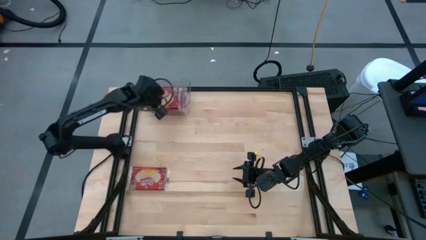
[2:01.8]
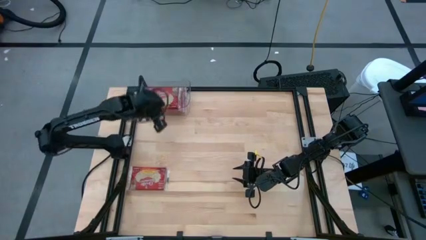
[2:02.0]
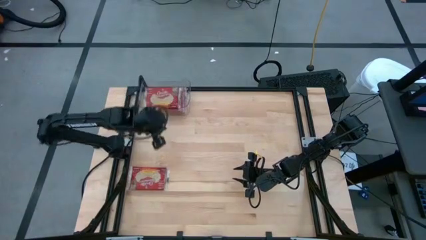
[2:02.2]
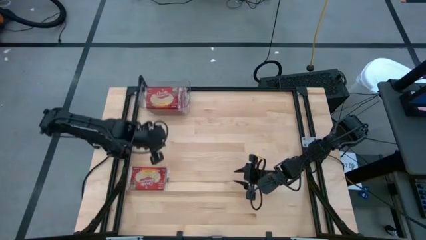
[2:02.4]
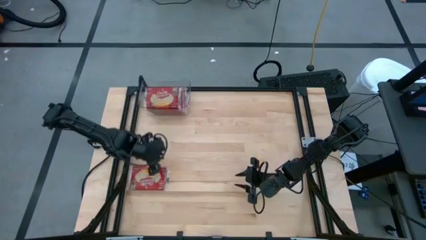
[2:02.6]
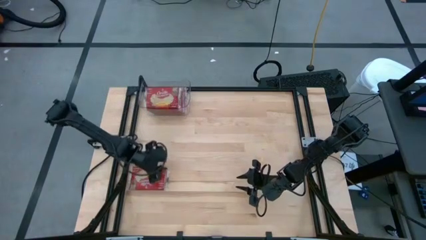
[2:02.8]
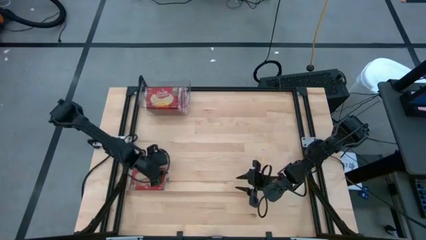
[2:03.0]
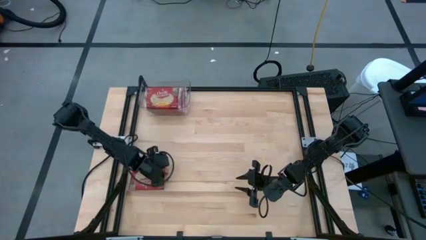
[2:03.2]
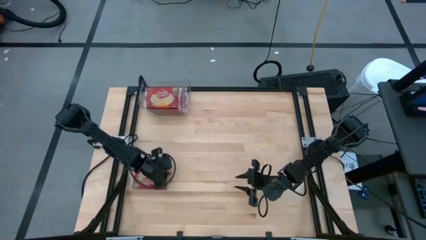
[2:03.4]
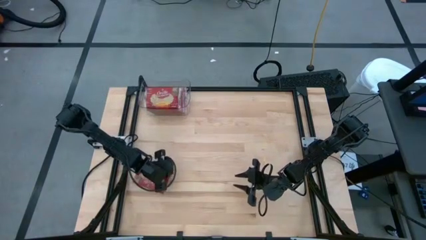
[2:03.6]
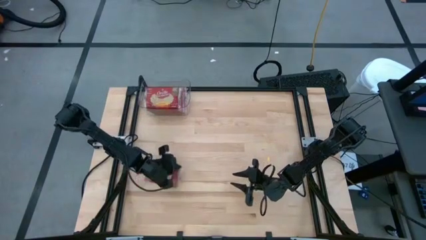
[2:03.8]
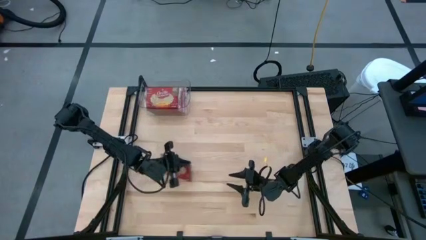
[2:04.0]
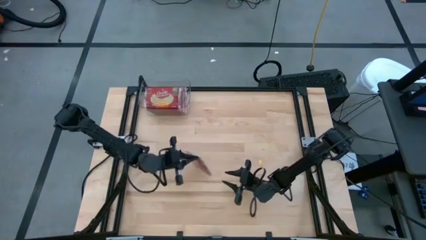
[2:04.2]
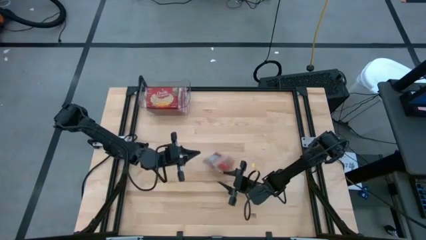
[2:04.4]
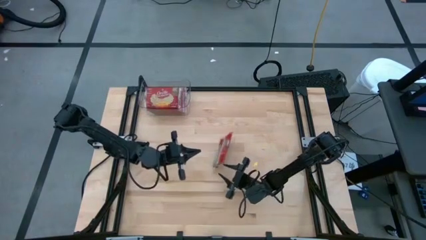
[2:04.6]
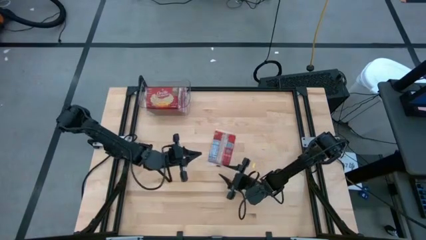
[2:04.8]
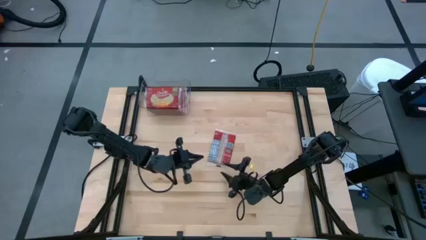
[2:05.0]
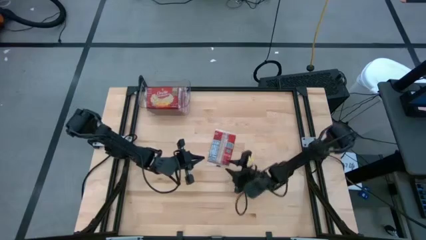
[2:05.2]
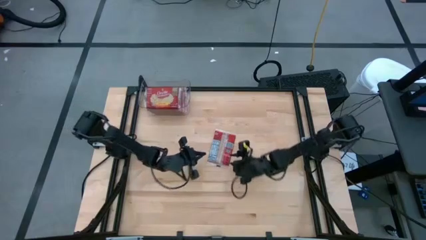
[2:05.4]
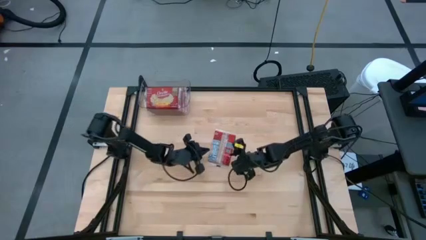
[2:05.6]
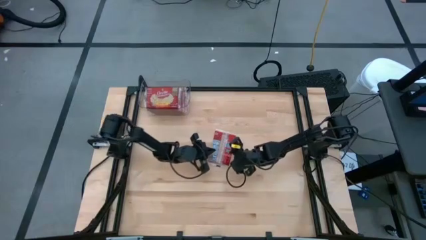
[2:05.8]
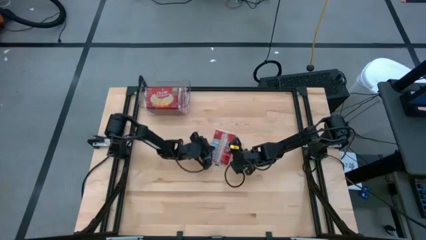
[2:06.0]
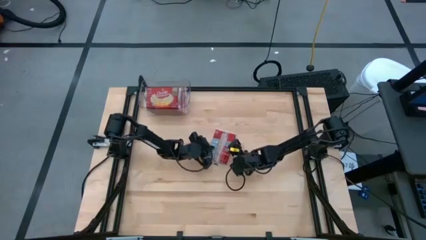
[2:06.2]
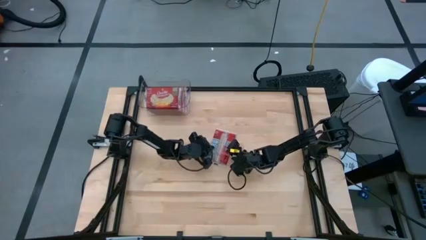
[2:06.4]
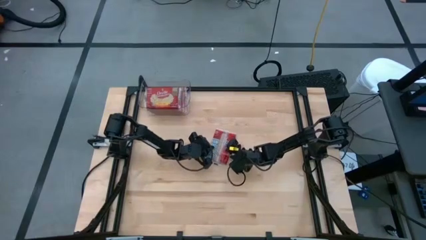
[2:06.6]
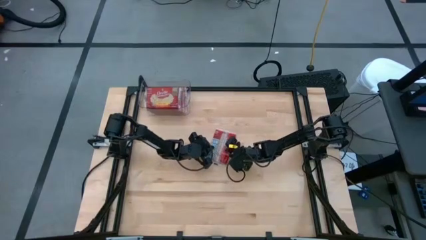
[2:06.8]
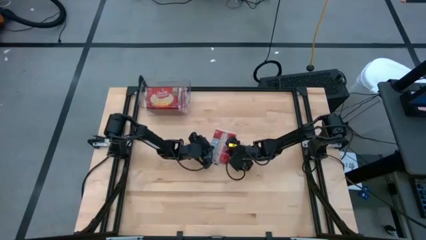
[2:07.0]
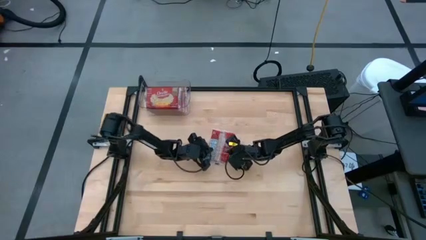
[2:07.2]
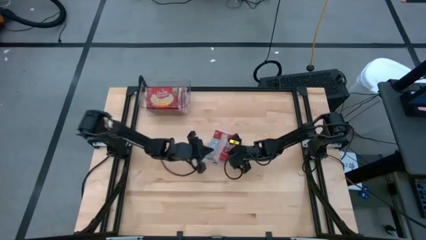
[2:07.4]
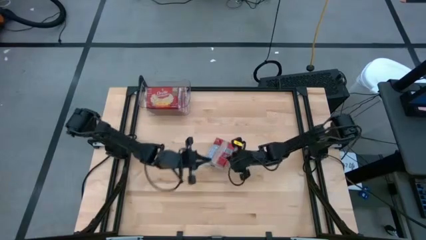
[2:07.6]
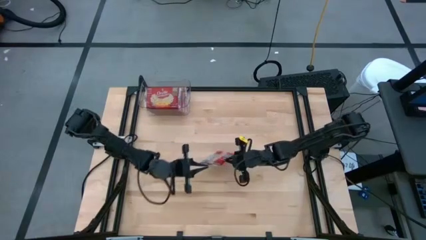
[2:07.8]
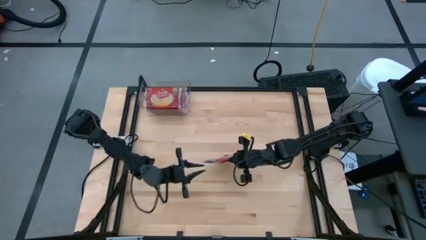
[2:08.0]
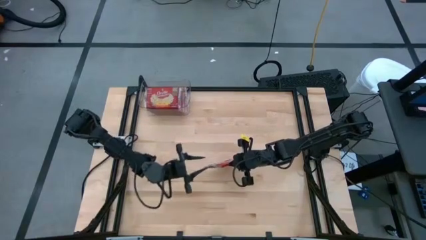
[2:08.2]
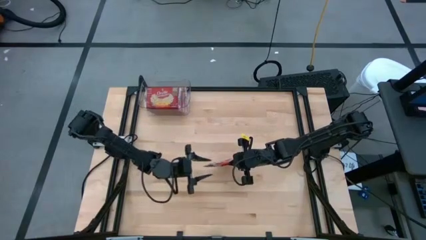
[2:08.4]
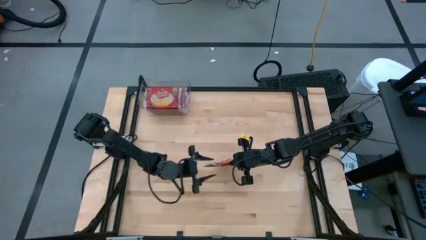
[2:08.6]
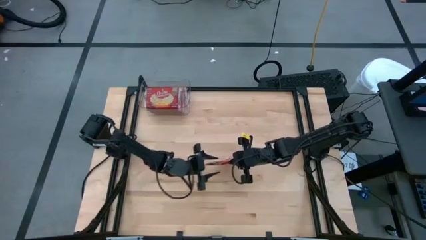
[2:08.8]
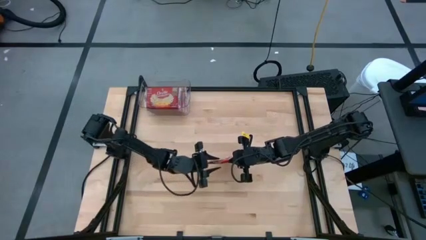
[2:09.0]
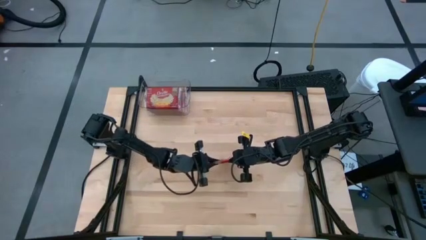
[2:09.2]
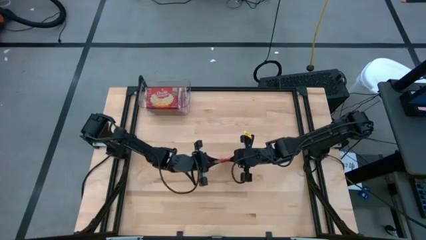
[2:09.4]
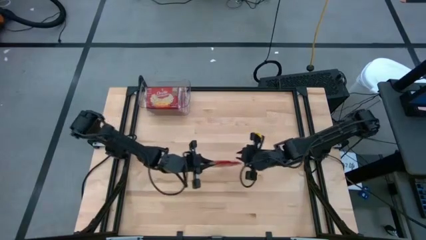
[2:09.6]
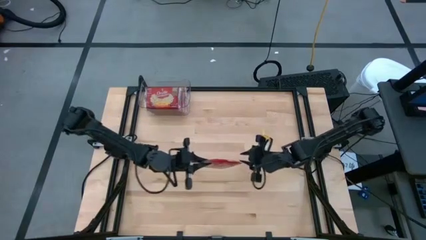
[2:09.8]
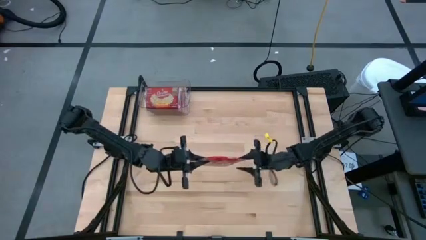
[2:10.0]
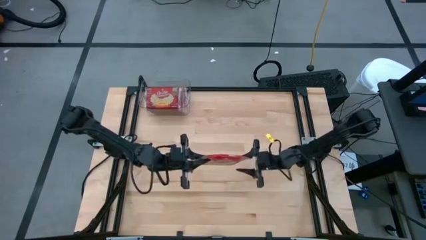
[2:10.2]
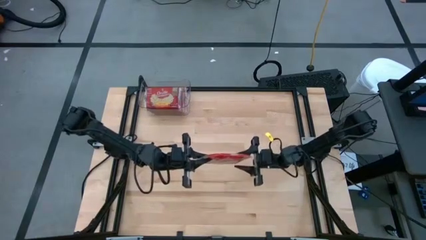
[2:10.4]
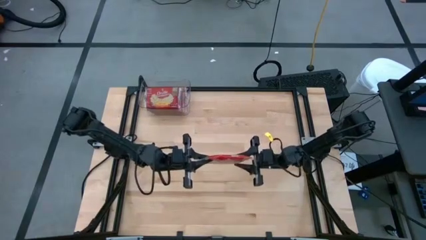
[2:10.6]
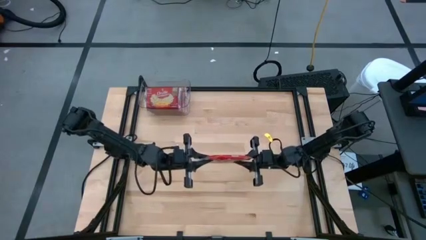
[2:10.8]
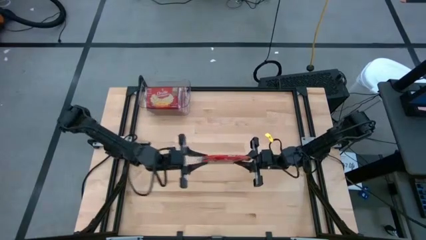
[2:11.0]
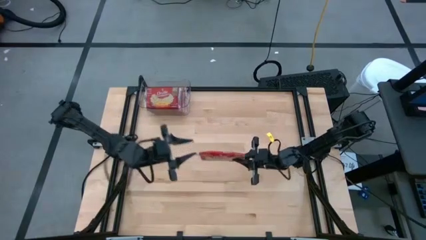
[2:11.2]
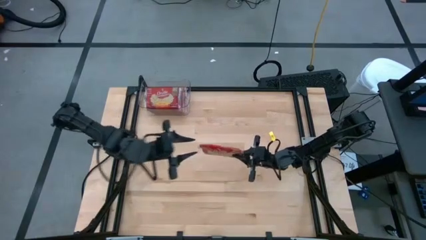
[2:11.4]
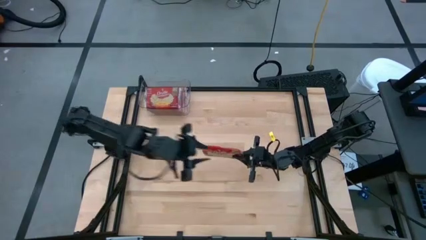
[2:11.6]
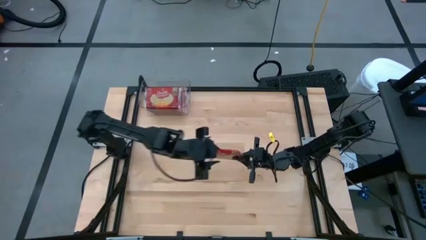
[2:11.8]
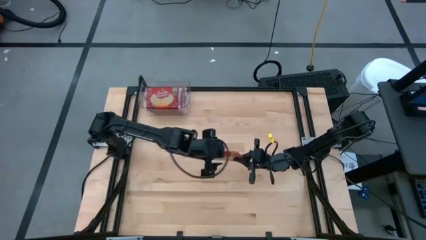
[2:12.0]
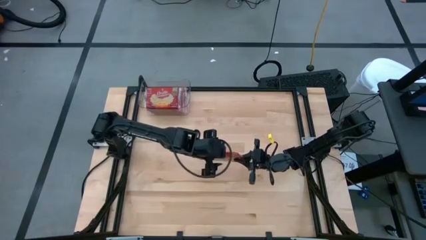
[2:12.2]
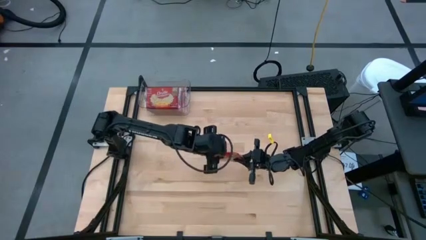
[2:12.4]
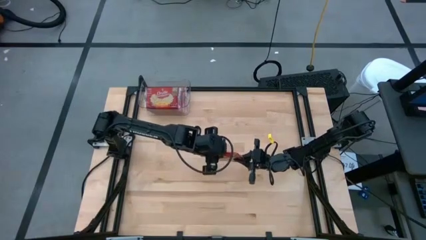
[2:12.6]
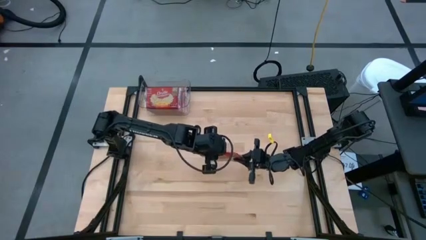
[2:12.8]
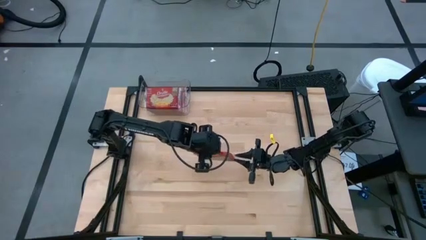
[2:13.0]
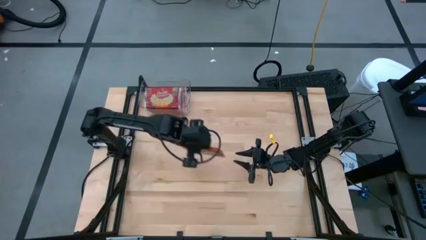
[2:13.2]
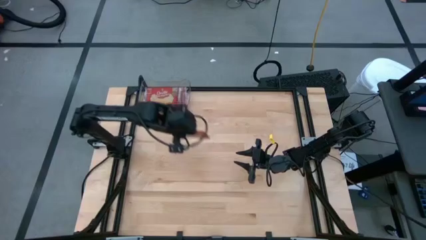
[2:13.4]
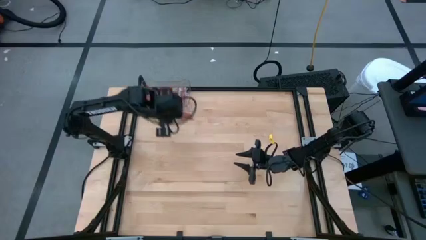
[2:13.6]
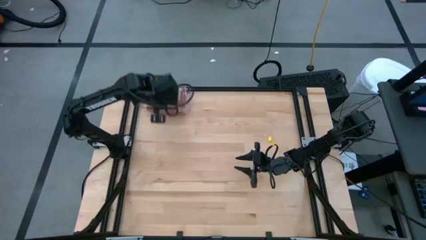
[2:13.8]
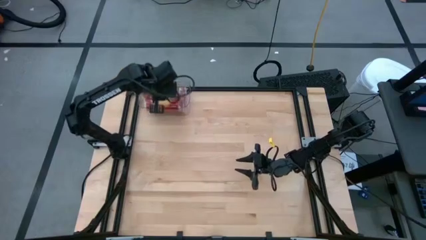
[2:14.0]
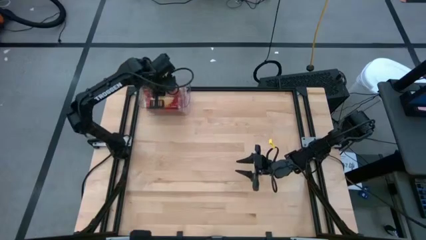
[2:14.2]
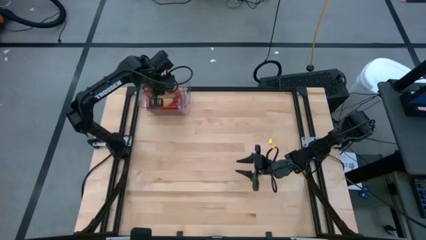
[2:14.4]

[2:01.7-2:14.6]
Task: Sort popcorn bags into baskets
Put the red popcorn bag into the transparent bin
